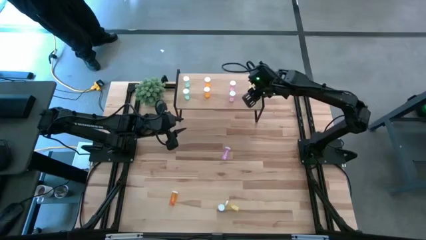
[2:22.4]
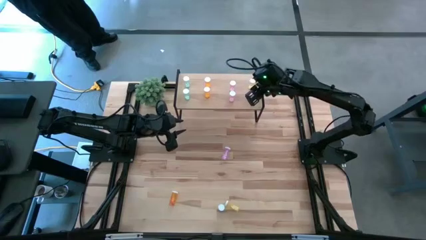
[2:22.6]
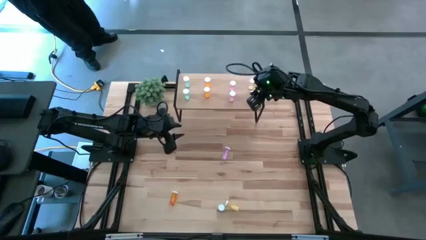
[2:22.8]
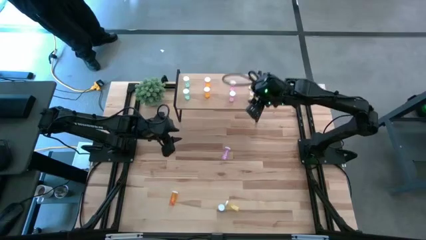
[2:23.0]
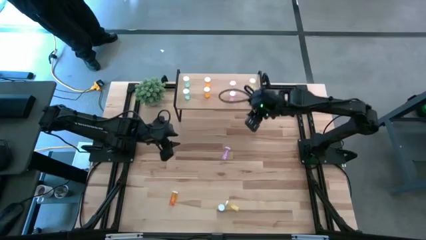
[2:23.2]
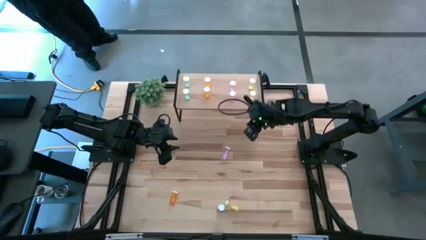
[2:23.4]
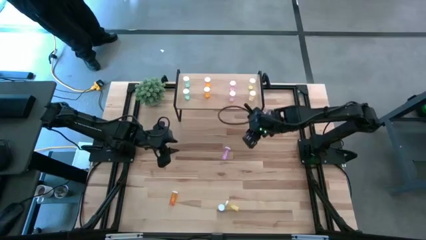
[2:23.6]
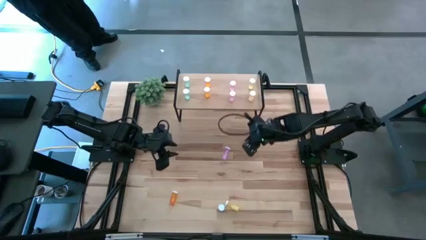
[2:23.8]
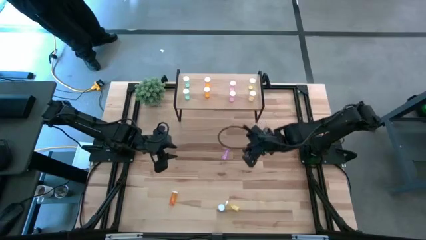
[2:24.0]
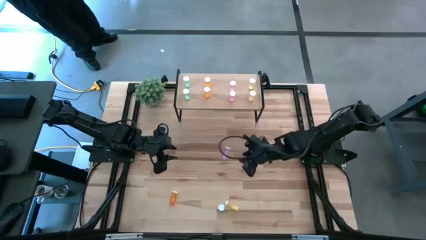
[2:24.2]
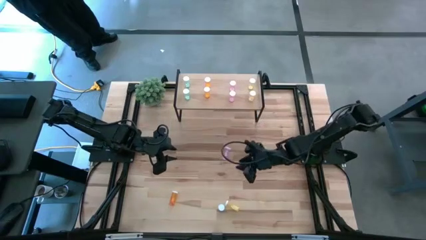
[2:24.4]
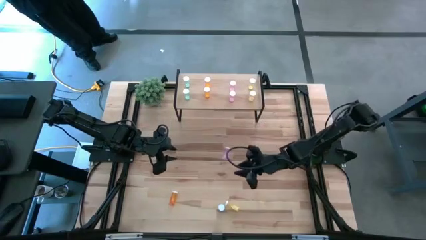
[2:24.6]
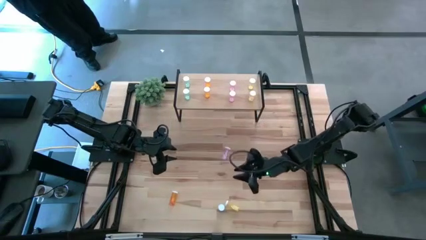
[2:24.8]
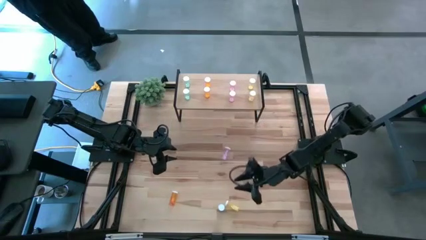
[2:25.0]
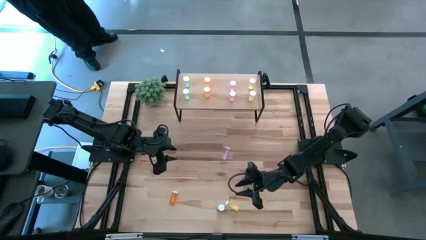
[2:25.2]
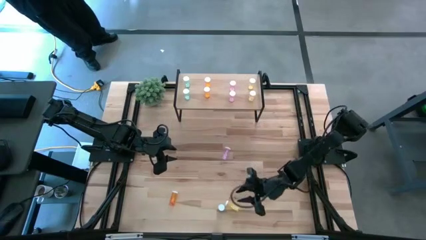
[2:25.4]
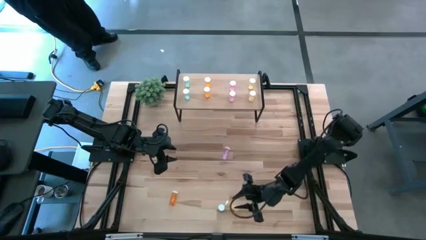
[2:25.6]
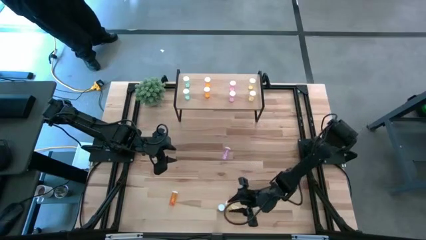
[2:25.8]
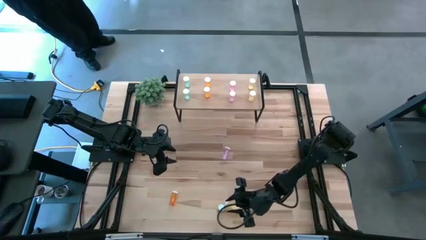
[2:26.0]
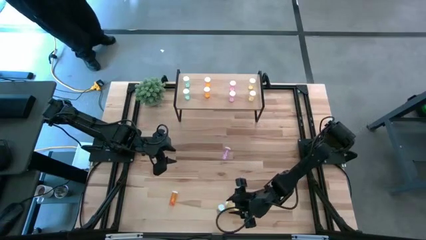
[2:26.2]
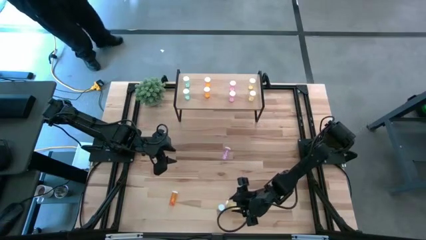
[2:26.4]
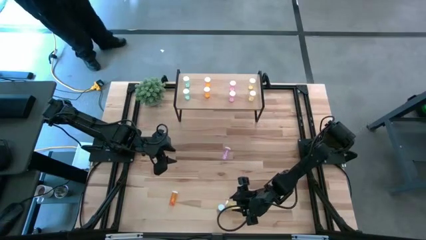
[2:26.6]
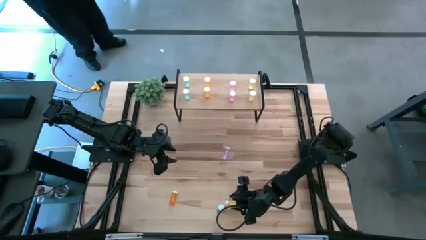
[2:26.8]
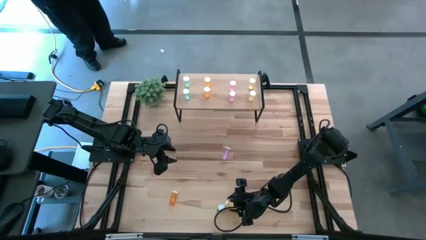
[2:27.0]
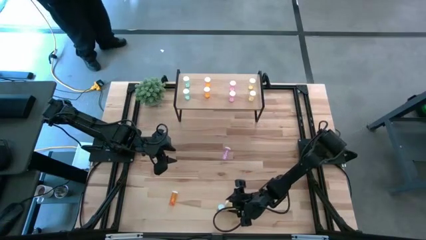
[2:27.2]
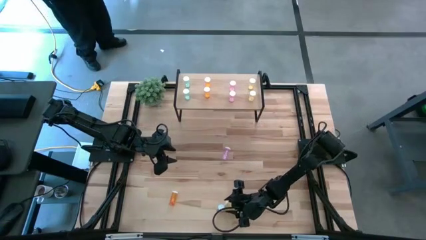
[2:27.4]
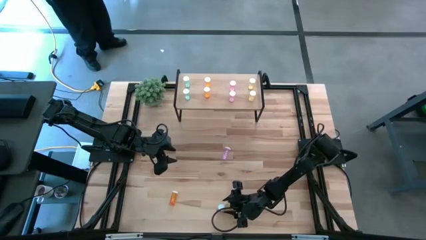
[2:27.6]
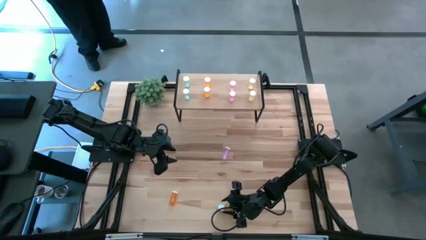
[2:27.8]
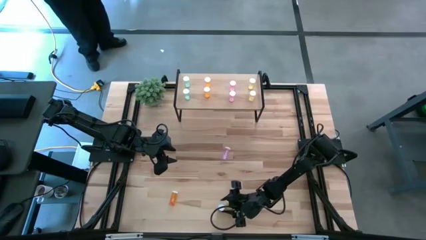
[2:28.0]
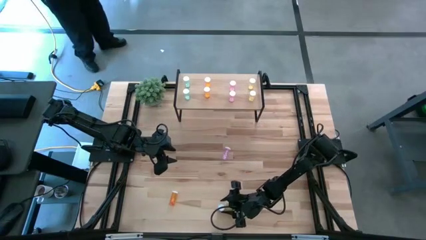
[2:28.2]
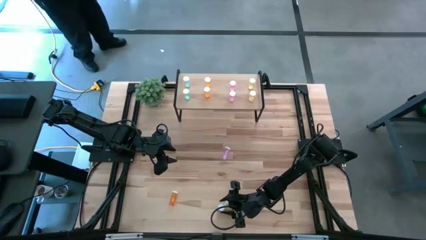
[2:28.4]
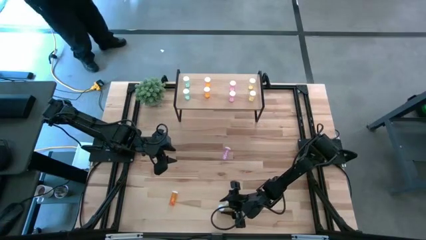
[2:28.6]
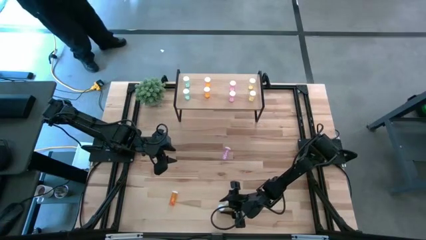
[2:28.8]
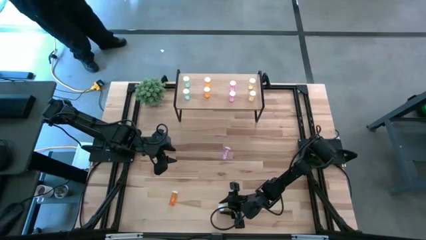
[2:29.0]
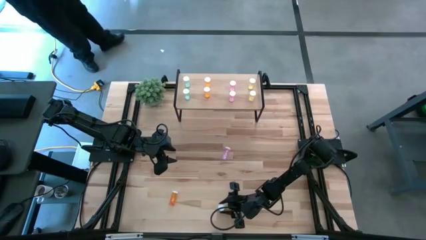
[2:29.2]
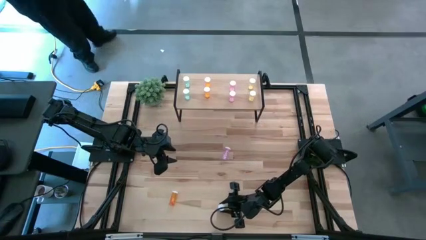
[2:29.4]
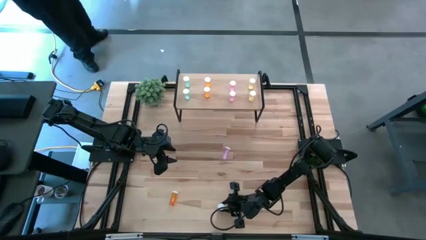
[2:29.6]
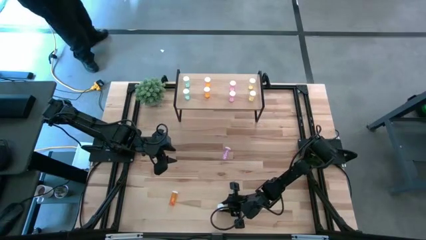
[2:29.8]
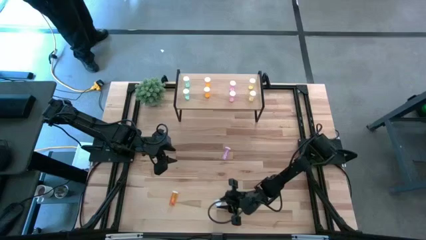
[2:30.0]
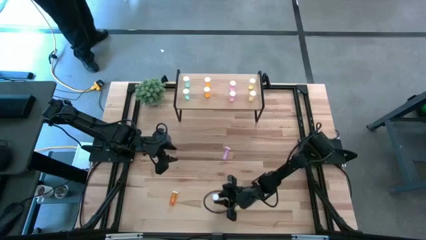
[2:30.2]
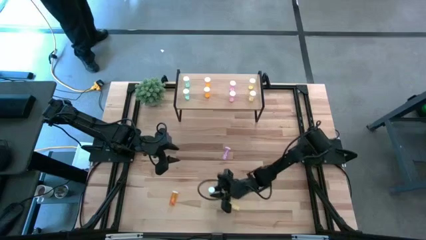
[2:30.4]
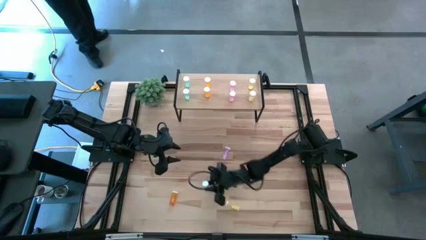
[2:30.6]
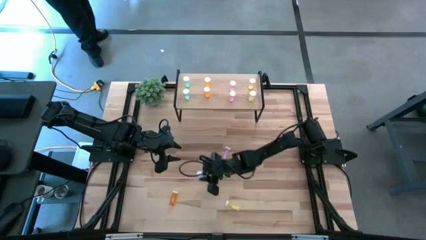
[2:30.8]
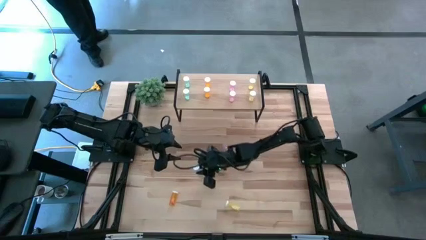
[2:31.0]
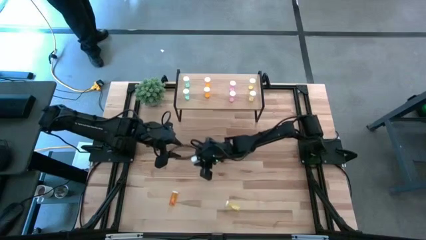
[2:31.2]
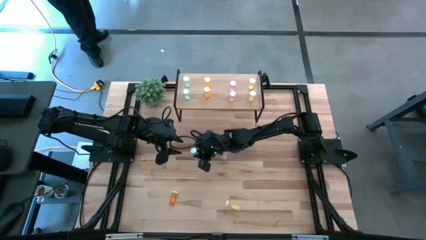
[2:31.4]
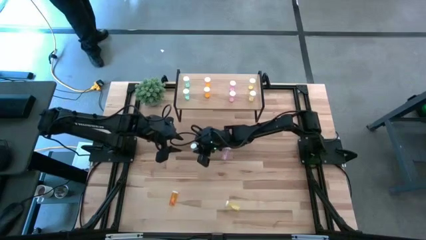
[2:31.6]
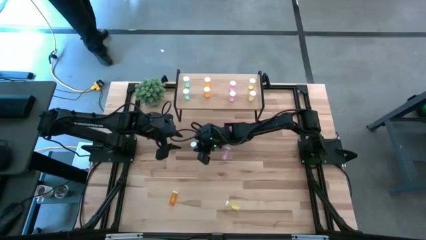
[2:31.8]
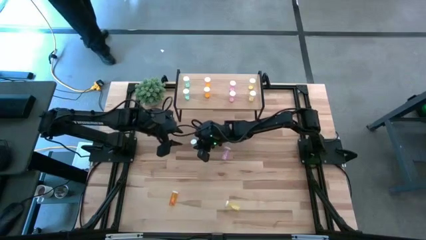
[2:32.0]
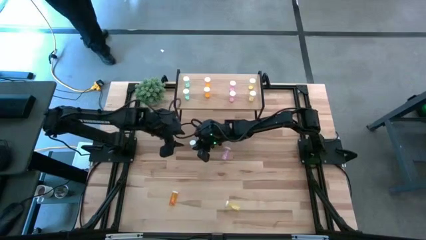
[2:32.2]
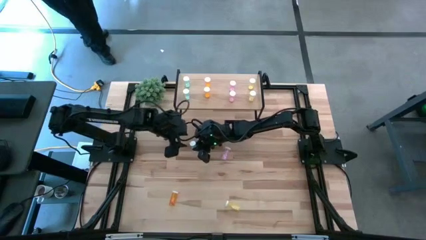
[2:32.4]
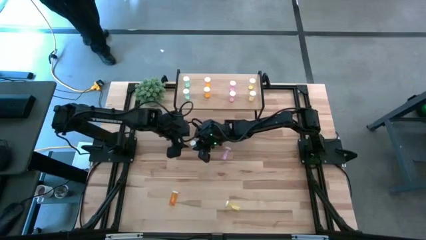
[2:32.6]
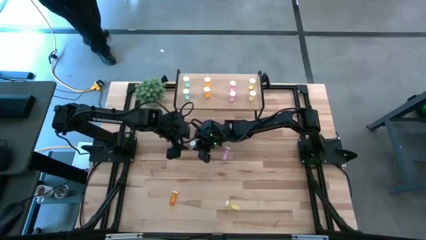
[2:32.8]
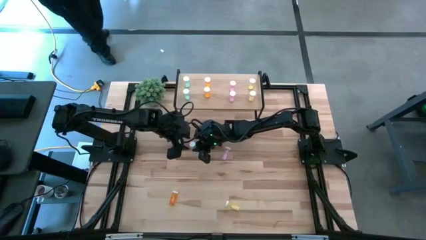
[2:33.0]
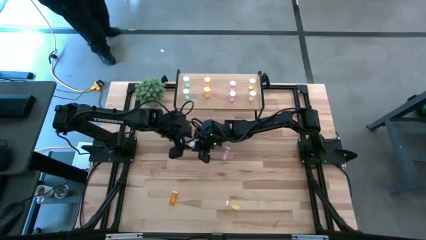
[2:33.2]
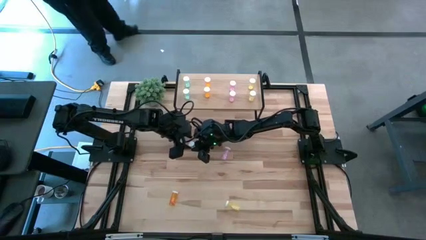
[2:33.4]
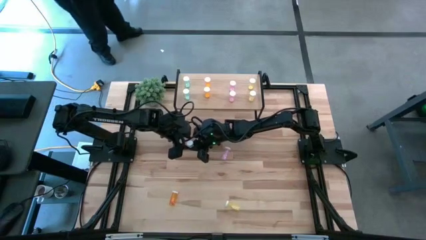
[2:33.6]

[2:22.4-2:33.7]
Task: Pick and place medicine bottles onto shelf by color
Put the blue pill bottle on the shelf aligned with the blue pill bottle

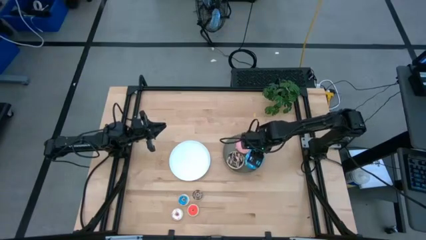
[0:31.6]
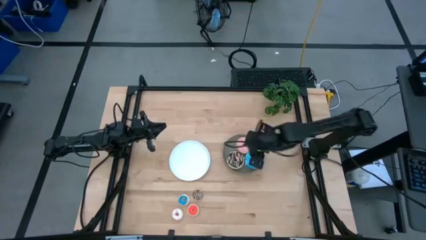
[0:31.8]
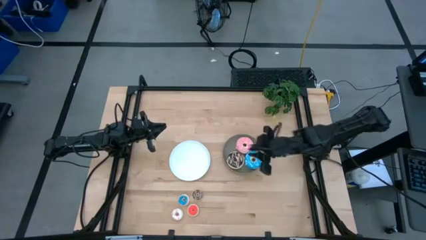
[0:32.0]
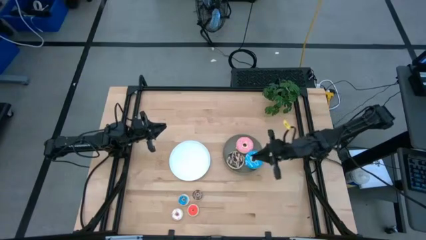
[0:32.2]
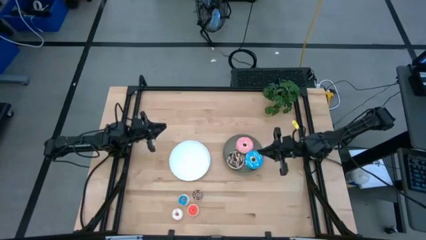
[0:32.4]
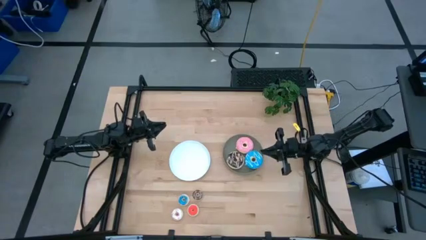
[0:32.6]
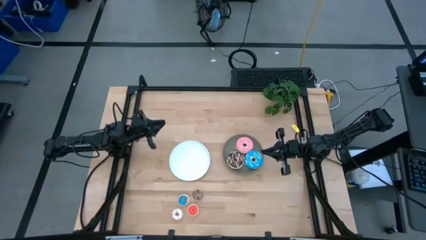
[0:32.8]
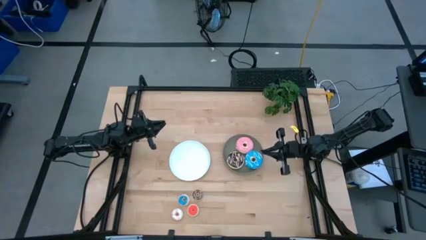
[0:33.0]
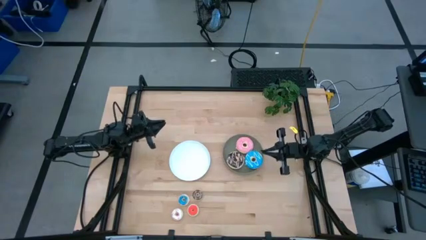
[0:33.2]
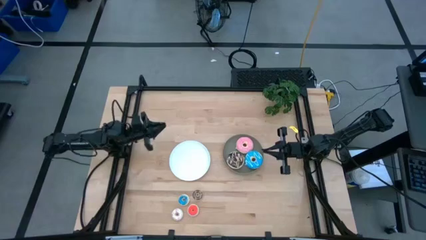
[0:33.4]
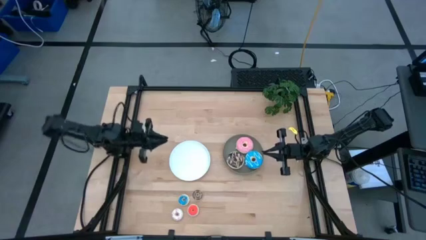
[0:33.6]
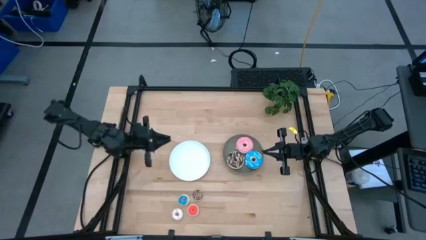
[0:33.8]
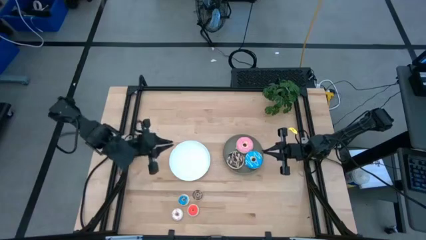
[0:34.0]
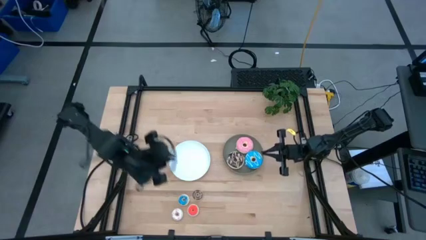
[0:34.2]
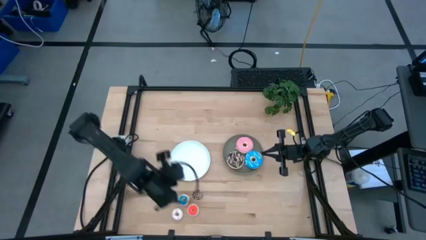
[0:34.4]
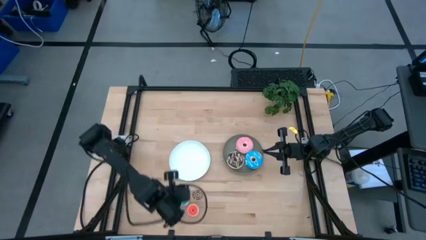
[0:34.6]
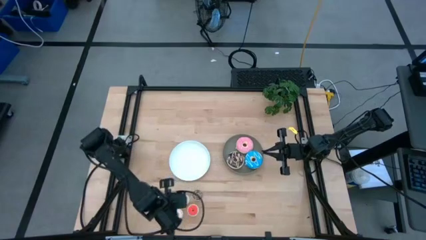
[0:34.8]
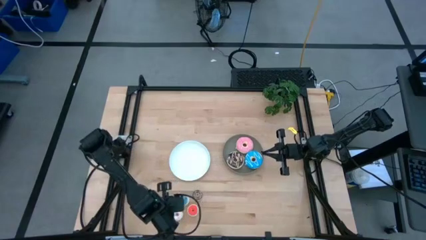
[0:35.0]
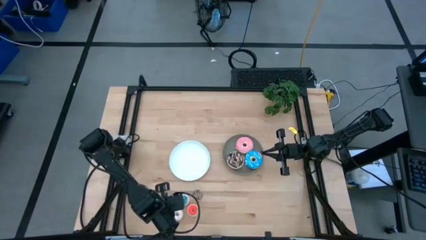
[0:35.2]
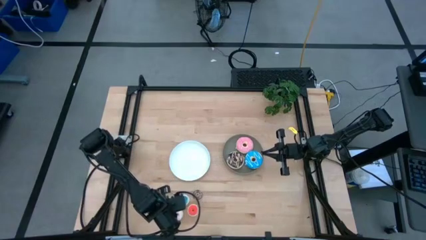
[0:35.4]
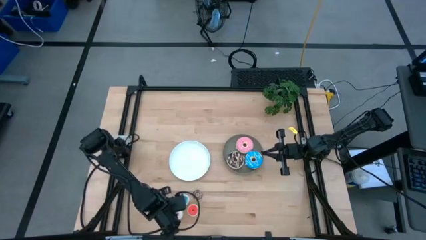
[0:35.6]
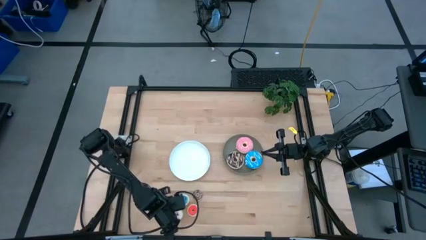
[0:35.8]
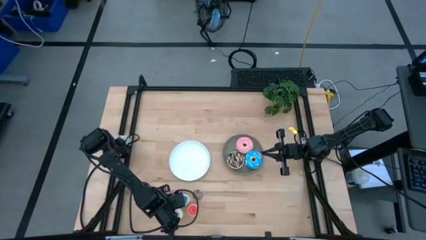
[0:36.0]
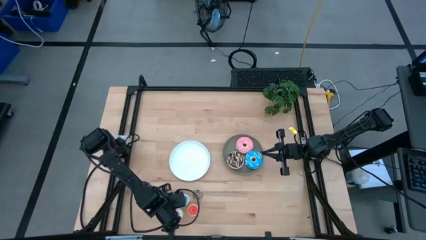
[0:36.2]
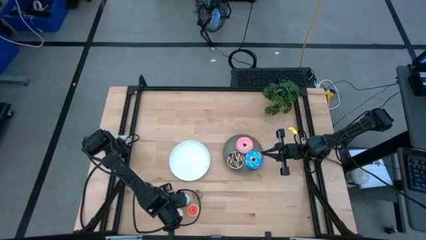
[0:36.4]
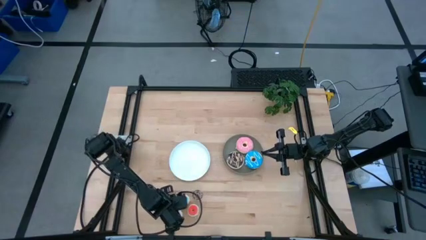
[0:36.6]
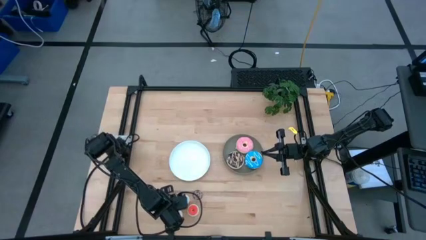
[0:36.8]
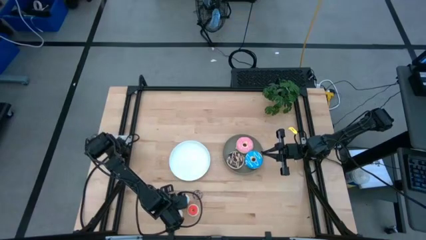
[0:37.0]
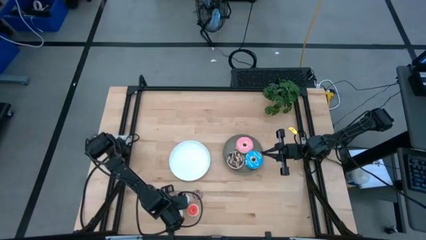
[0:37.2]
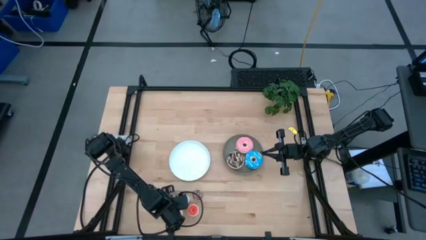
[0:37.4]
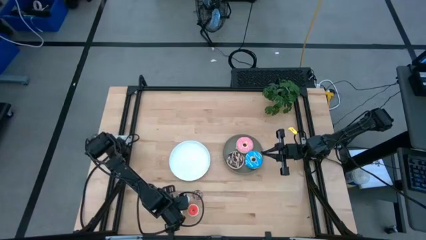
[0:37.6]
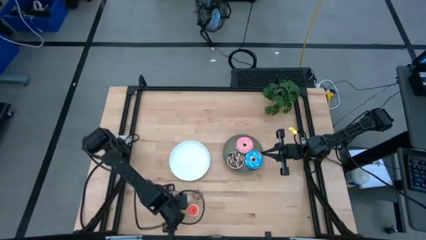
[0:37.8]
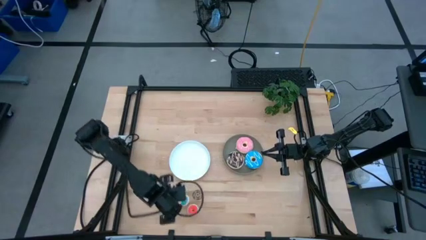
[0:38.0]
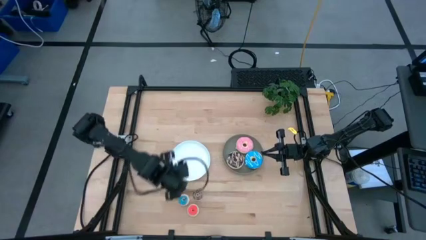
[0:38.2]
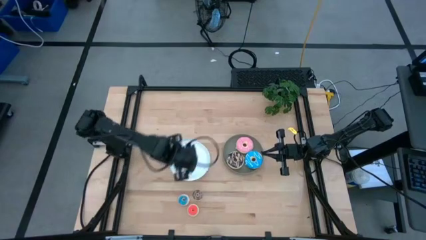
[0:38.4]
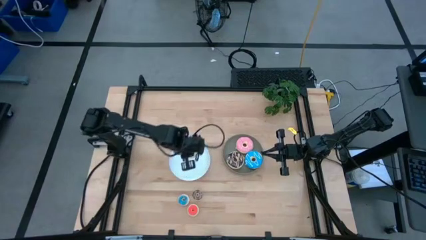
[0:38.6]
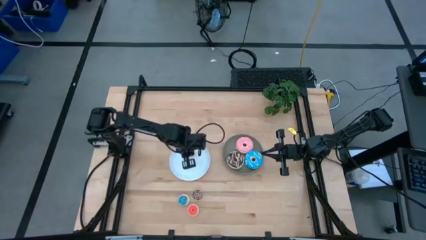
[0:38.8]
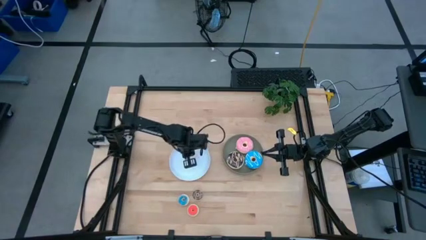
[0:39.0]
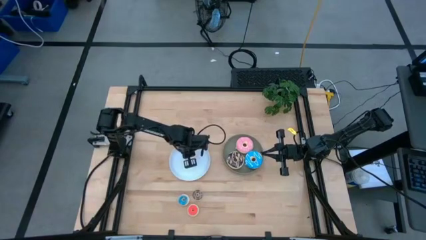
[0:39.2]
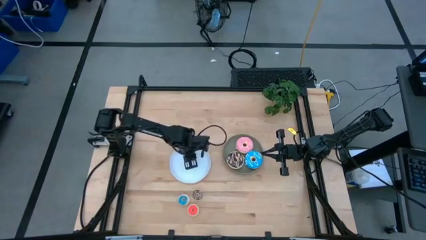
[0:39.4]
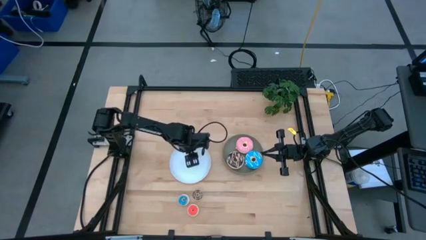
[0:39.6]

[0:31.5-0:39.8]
Task: Pick & Place donuts
Put the small white donut on the white plate
